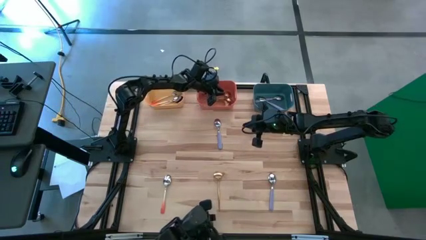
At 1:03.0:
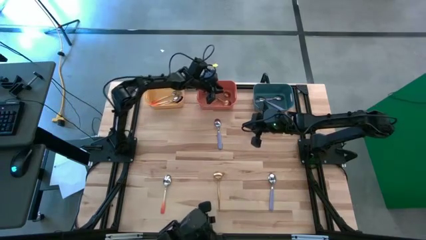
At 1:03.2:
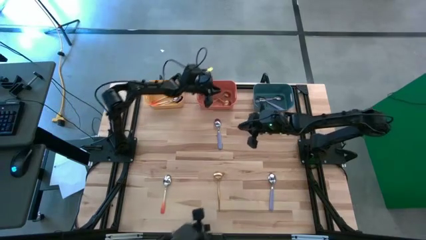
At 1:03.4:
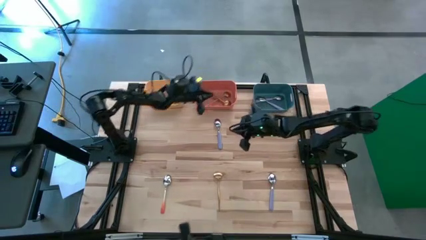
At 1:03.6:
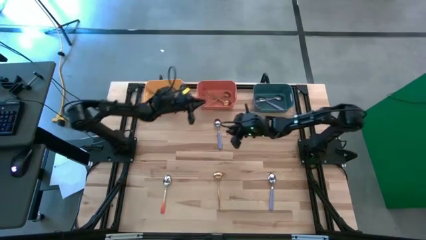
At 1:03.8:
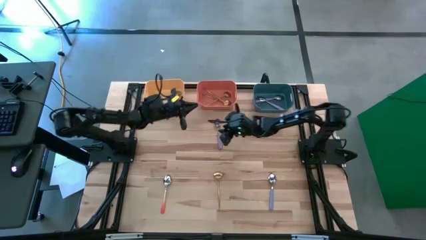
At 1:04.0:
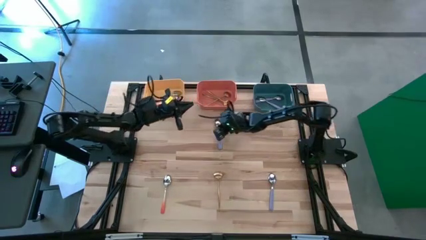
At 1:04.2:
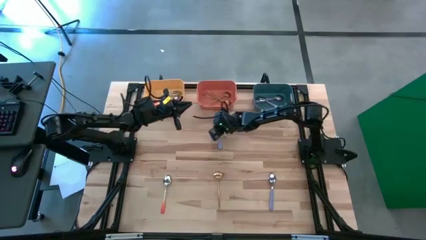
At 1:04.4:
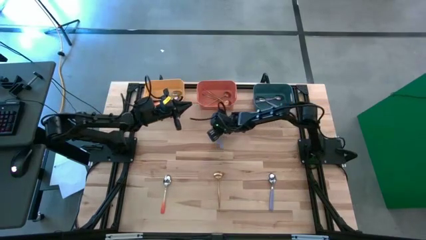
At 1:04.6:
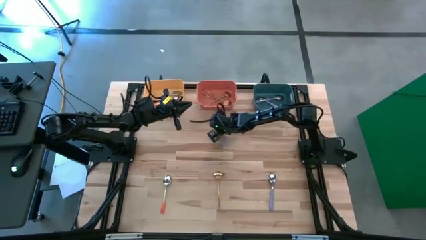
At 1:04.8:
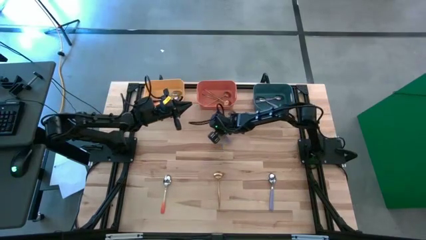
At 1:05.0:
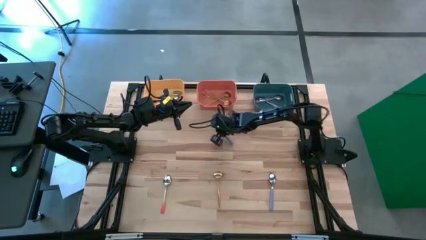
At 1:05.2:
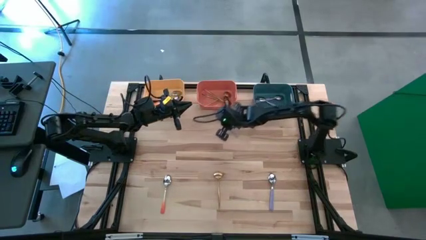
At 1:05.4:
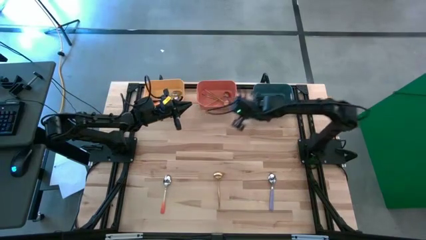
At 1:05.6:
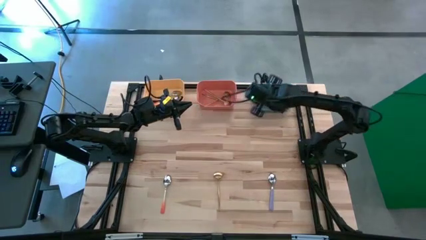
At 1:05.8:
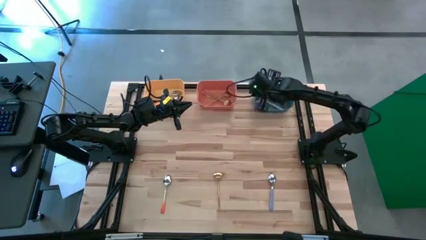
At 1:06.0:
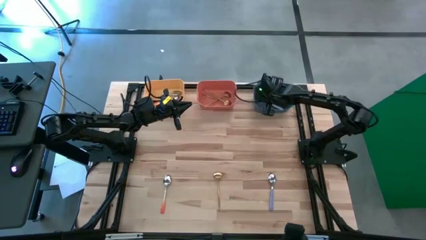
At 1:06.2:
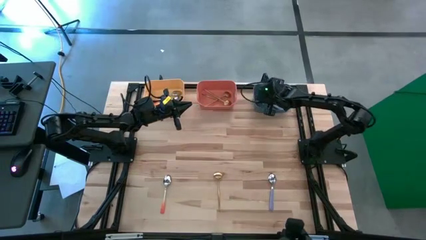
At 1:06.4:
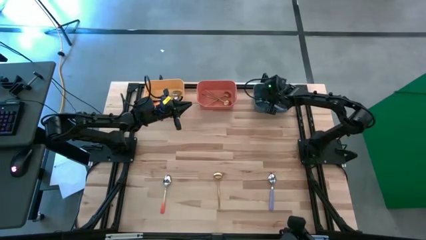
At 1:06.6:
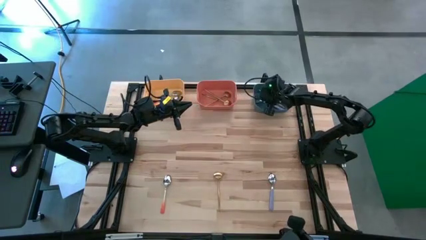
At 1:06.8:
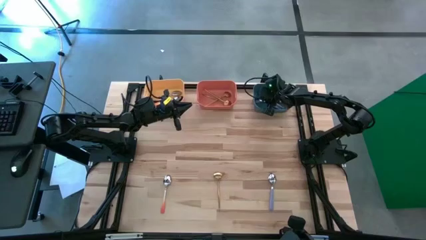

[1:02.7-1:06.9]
Task: Sort silverware by color (type)
Put the violet spoon into the blue bin

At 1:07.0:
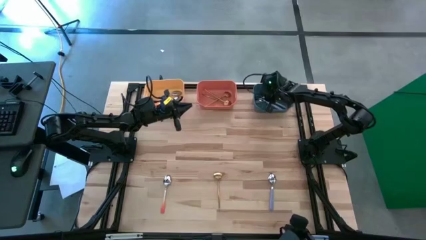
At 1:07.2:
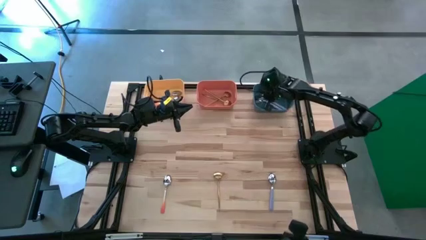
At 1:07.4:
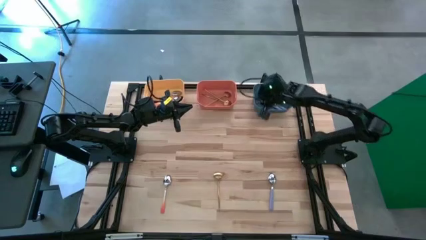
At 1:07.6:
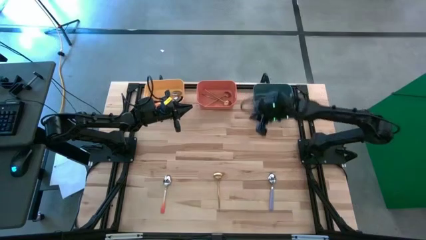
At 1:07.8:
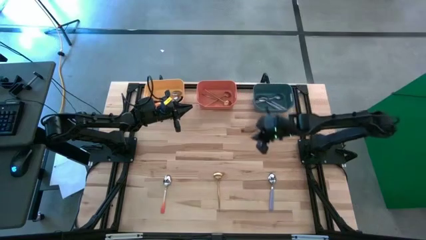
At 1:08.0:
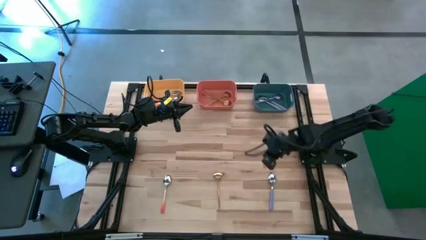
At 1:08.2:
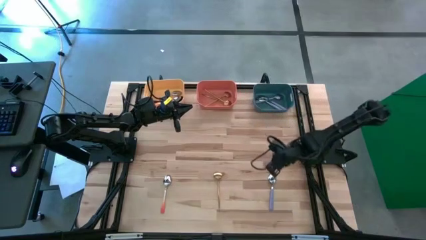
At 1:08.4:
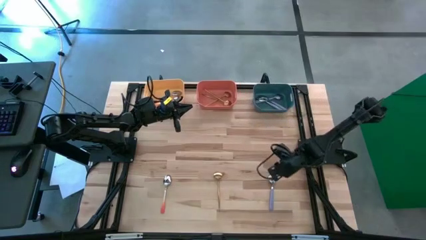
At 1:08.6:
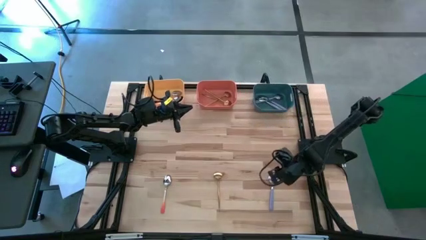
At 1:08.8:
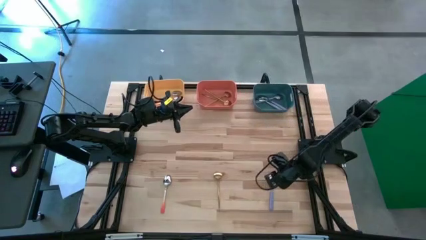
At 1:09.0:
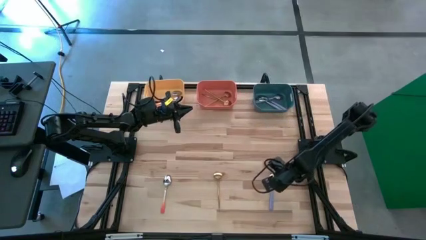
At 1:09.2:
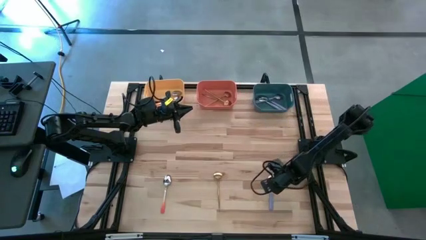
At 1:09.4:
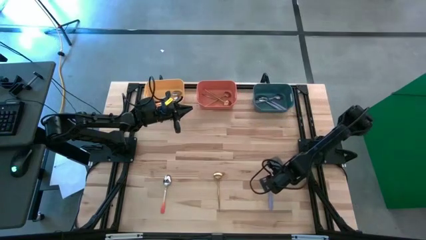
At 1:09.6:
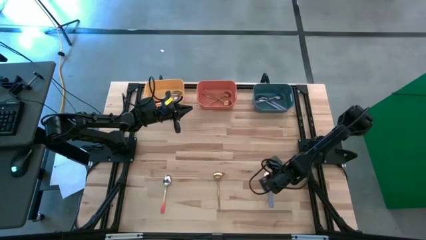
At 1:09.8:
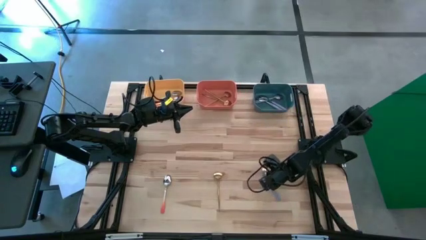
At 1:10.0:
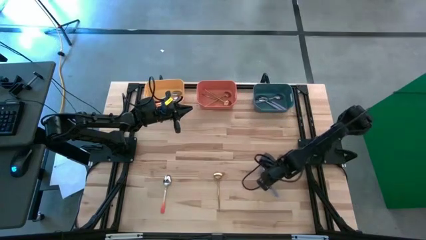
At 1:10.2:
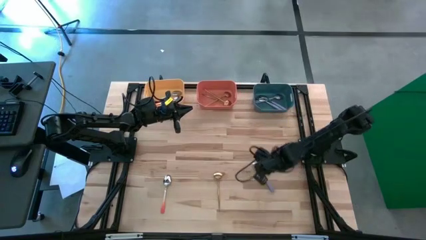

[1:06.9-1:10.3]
Put the violet spoon into the blue bin

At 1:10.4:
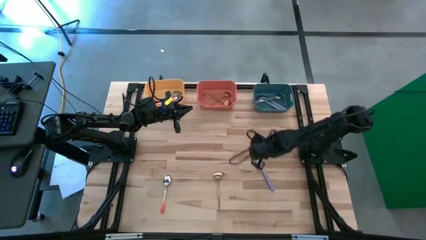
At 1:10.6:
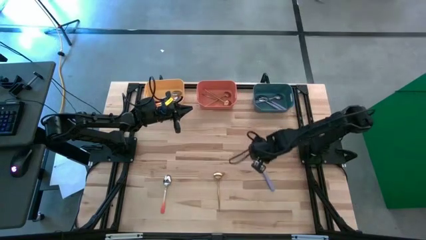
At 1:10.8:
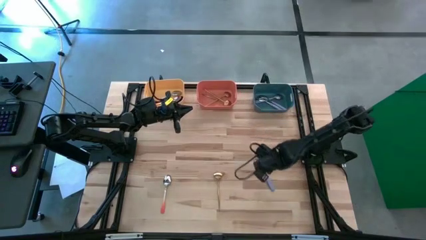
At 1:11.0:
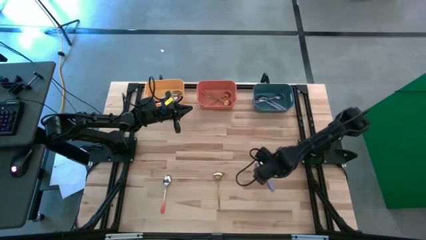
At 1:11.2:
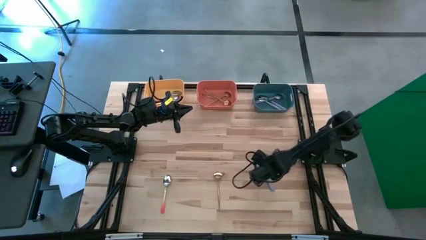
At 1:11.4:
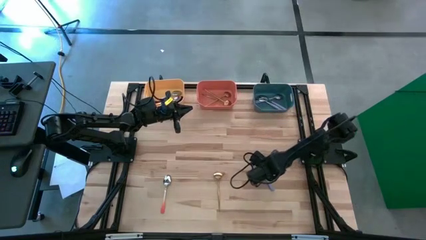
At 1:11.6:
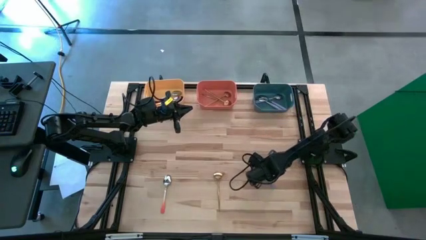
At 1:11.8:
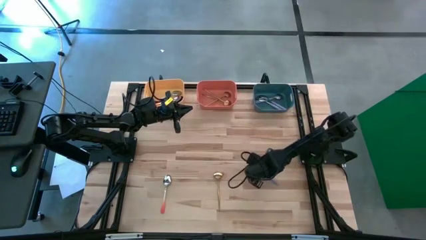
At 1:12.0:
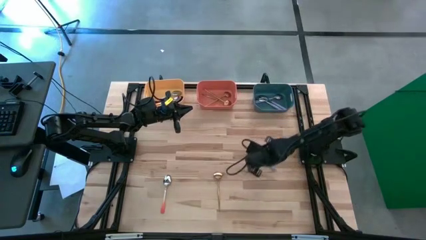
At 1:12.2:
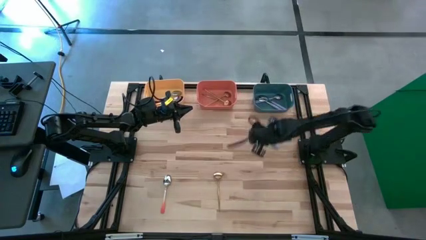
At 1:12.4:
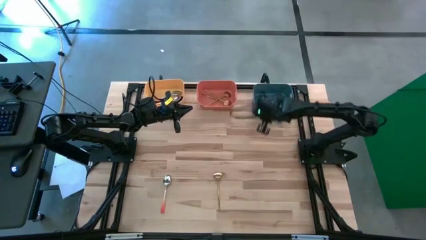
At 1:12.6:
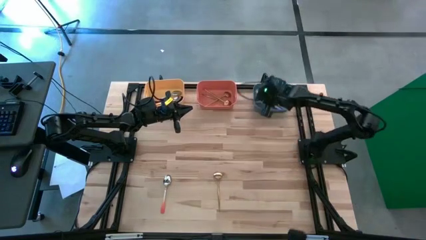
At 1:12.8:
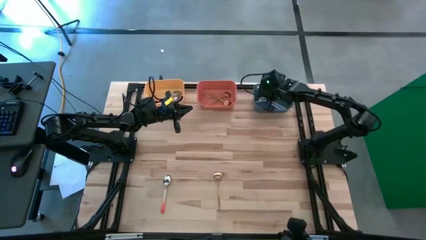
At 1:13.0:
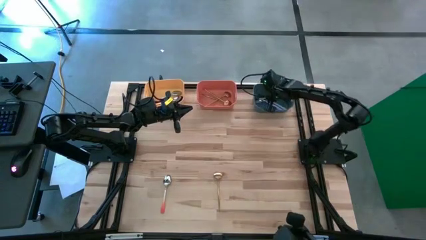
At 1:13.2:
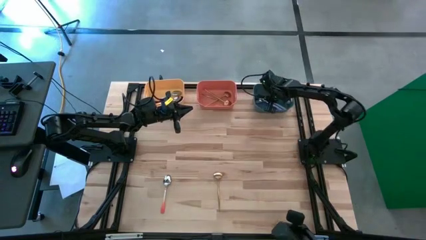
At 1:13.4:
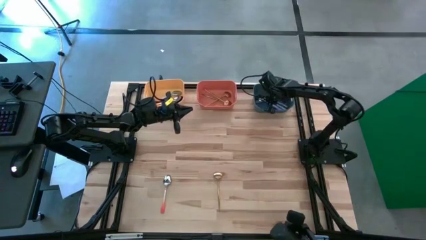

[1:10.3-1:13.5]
Put the violet spoon into the blue bin

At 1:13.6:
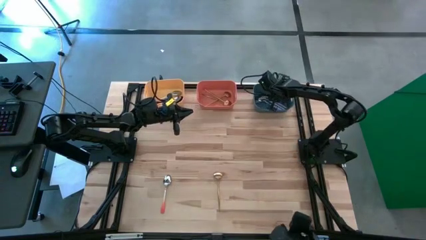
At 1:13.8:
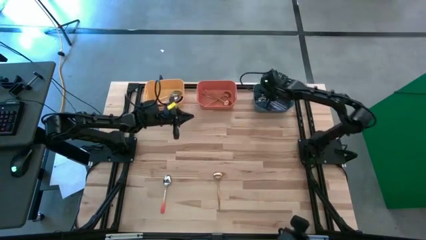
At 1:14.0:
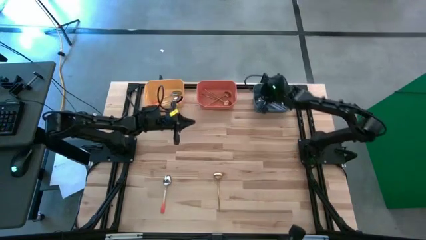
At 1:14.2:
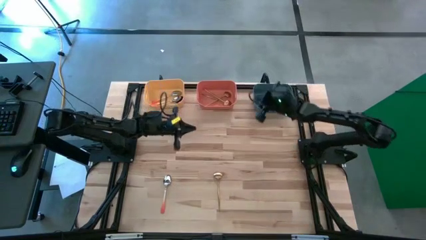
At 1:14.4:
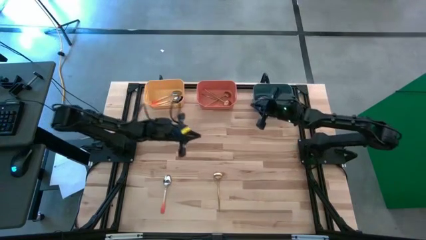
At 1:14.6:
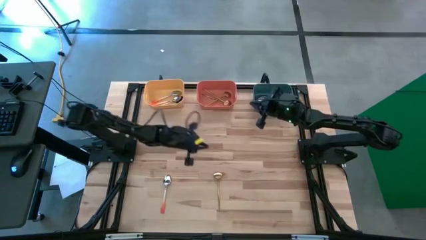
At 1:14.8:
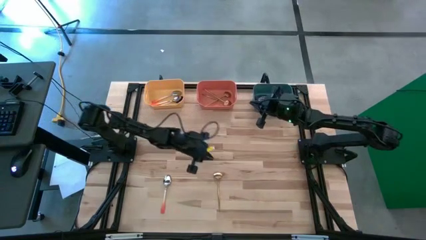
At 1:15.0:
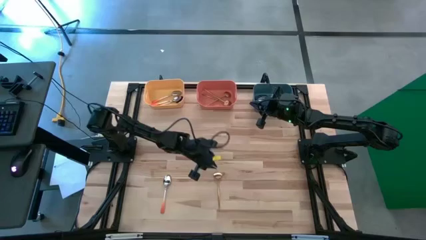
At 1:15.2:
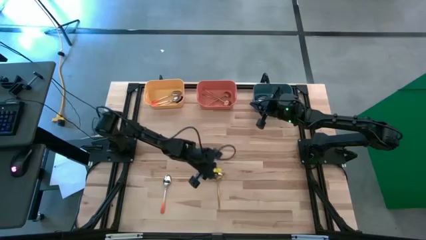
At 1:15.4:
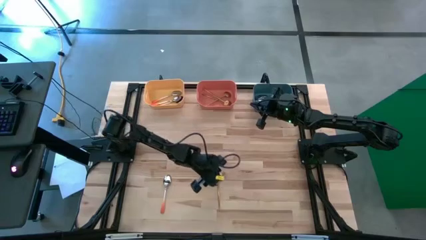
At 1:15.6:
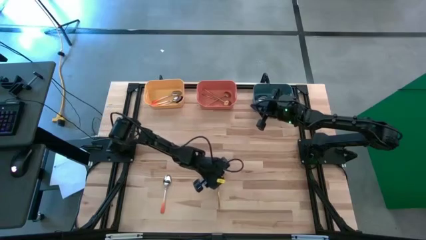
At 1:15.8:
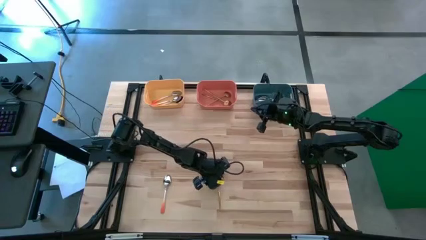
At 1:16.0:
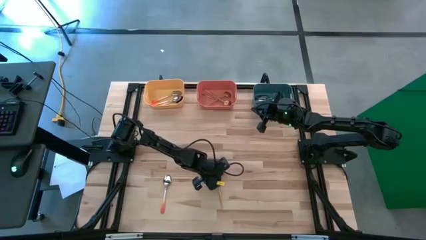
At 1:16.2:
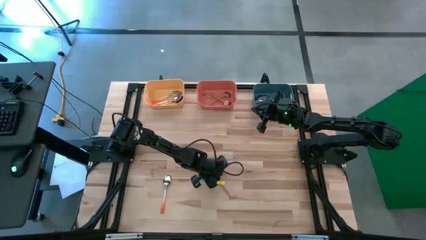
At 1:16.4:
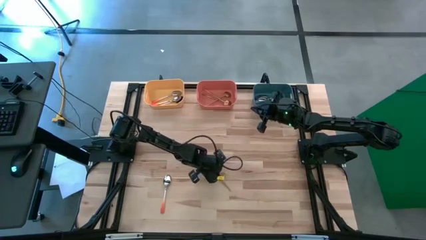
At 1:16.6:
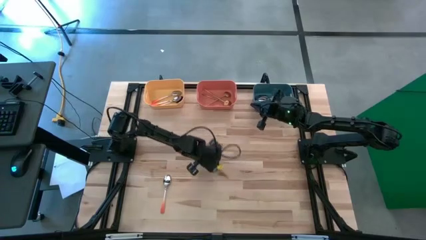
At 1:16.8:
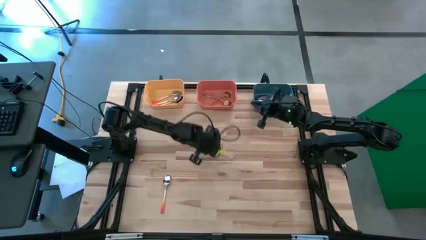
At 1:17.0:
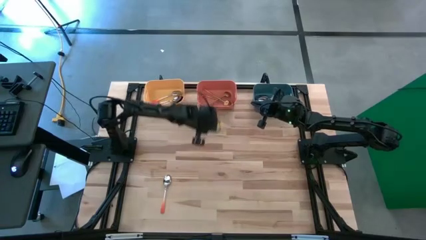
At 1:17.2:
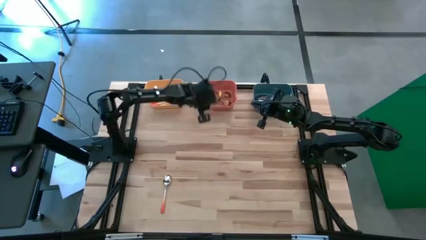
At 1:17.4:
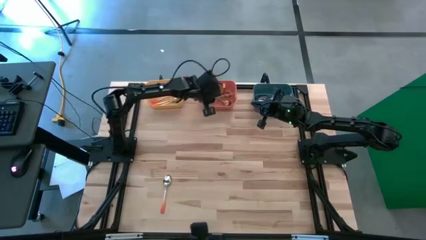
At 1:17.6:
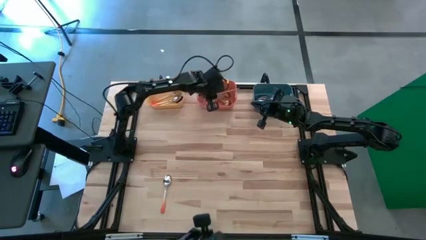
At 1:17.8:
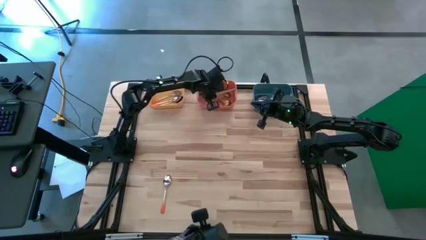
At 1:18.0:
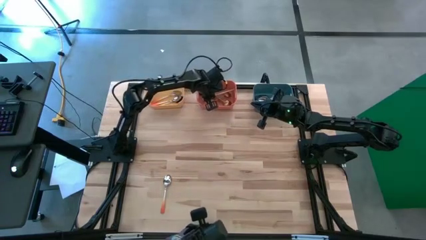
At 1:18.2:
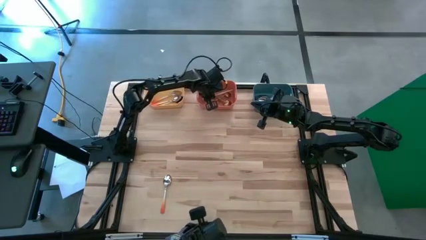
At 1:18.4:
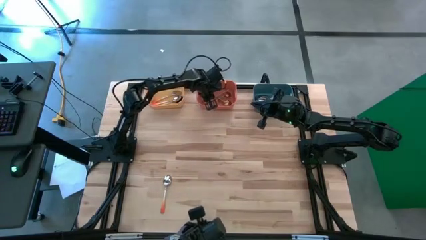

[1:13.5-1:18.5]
Put the gold spoon into the orange bin

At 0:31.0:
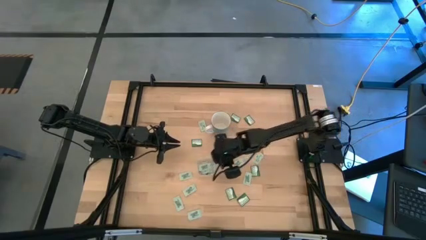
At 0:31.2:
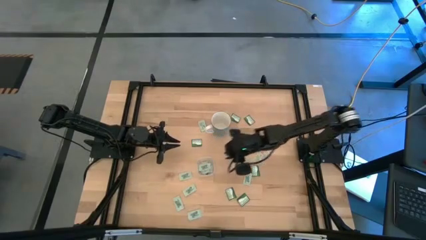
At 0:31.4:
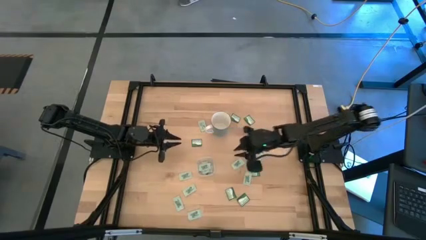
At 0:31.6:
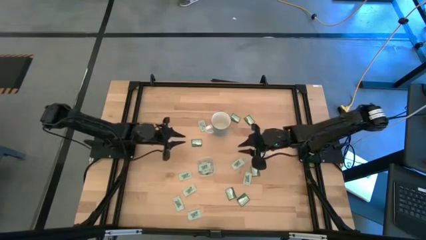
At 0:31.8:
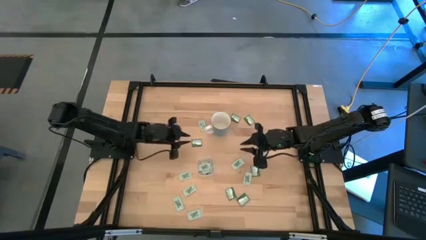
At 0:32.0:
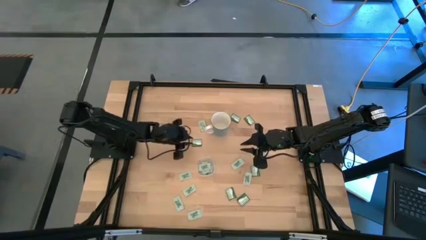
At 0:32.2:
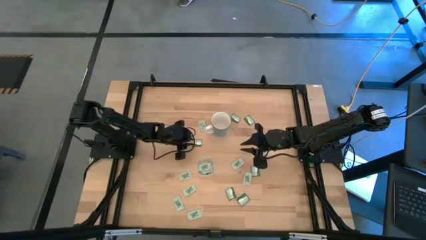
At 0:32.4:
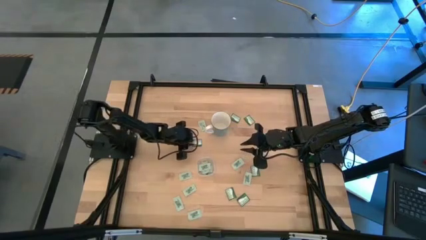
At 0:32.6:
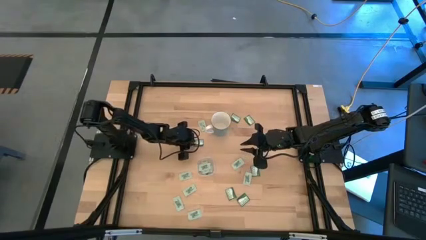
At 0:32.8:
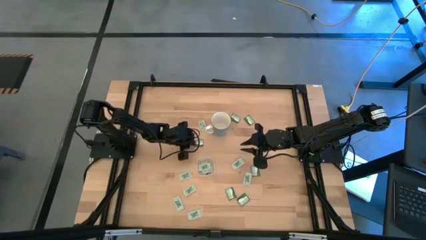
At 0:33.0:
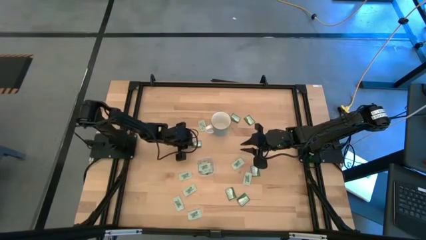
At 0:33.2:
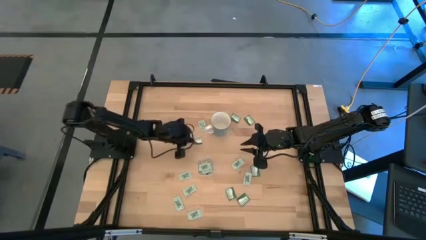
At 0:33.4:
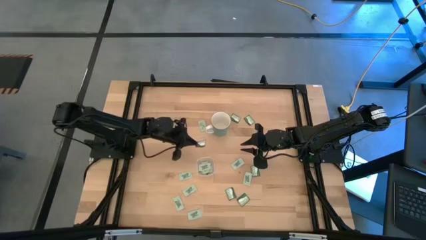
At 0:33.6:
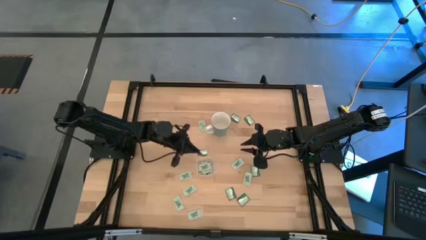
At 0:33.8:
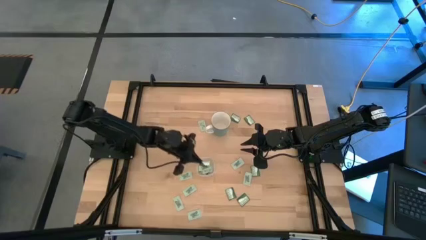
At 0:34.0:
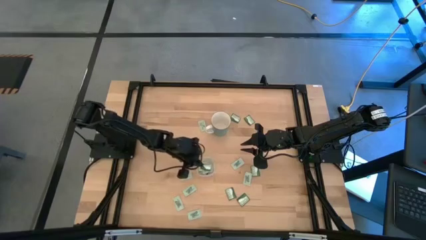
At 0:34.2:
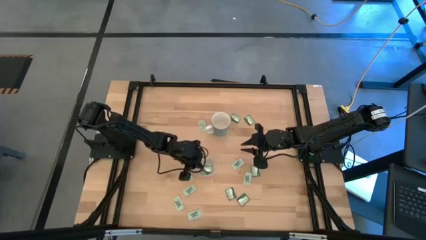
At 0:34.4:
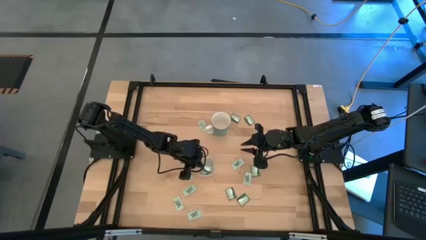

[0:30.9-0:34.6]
Task: Pick and place Stevia / Truvia into bins
Put the green stevia packet into the transparent bin
